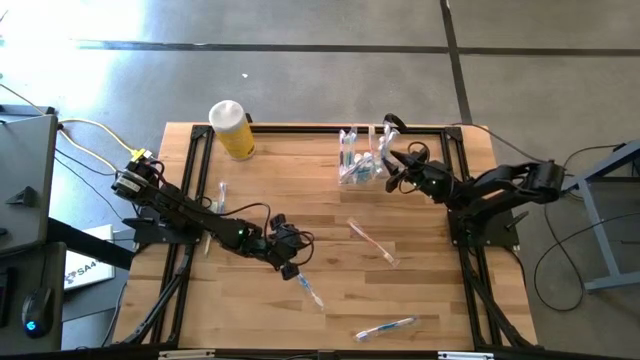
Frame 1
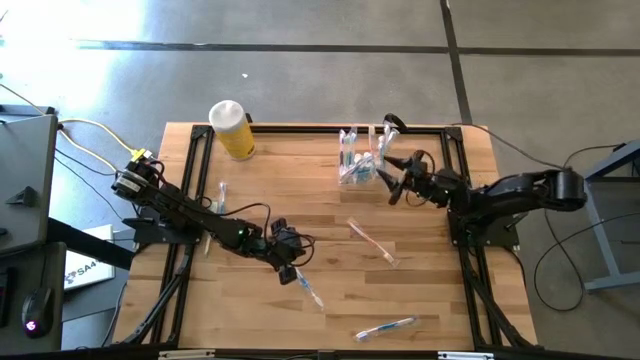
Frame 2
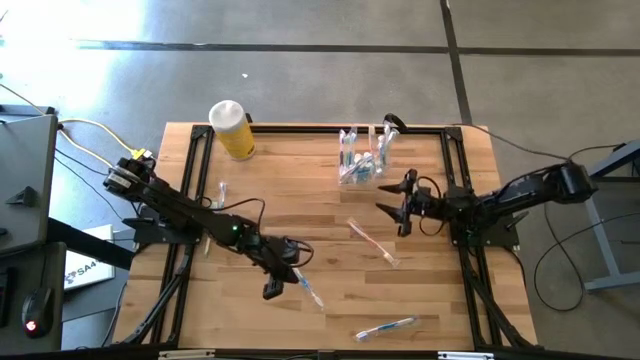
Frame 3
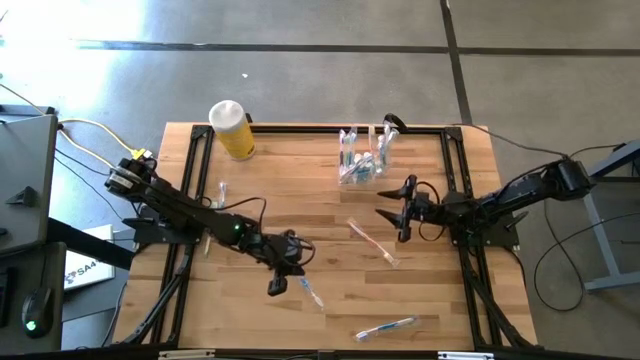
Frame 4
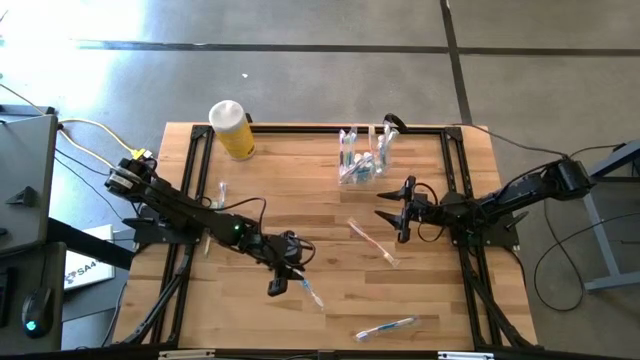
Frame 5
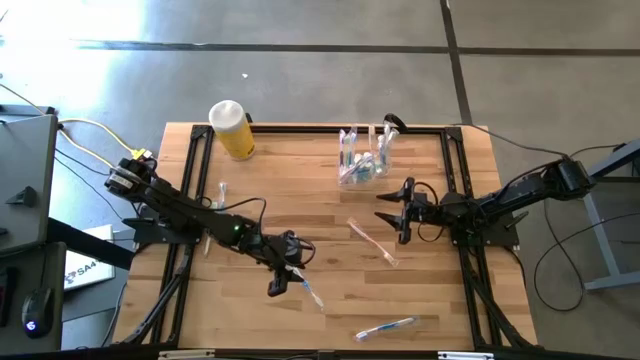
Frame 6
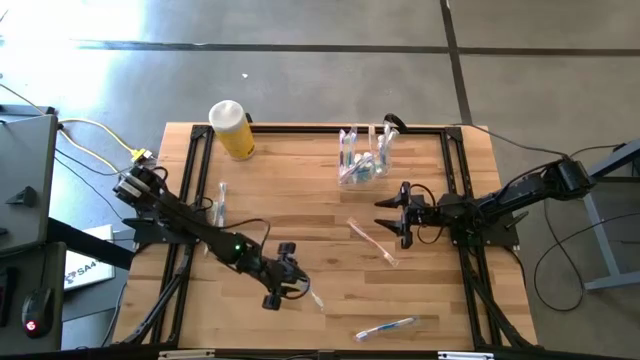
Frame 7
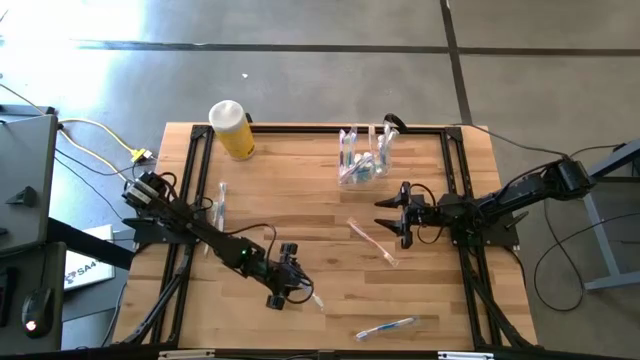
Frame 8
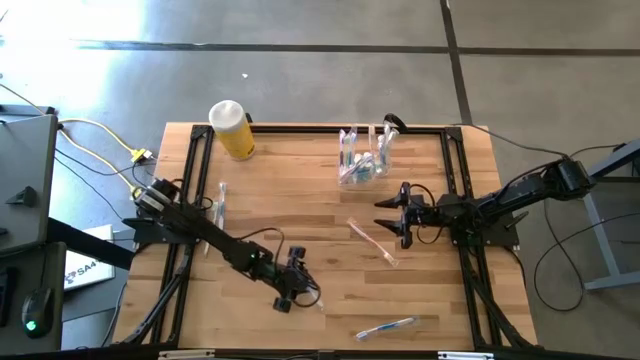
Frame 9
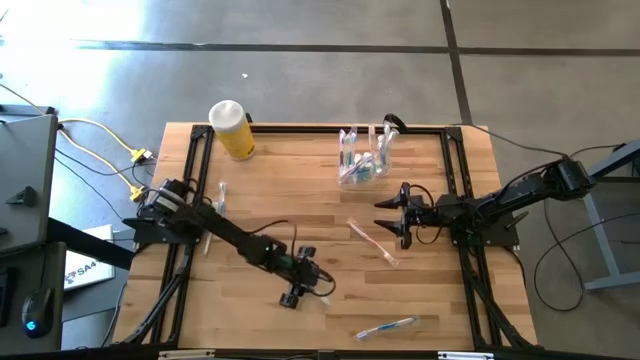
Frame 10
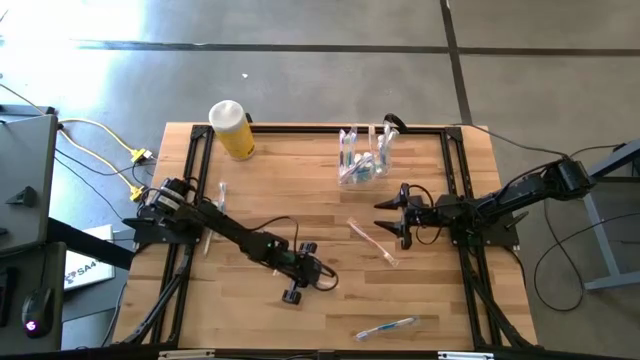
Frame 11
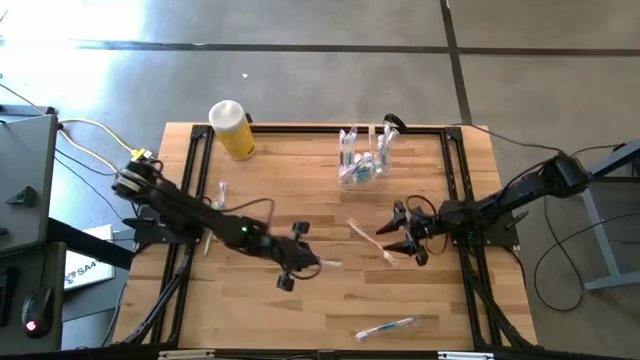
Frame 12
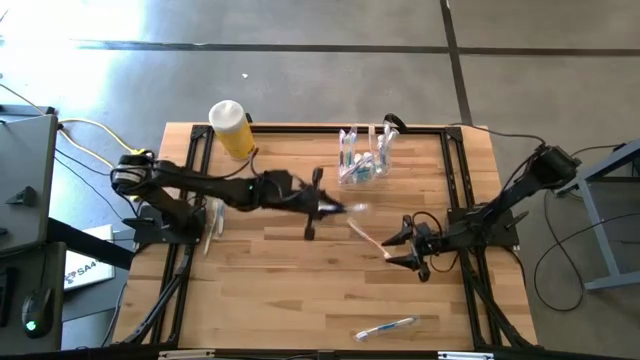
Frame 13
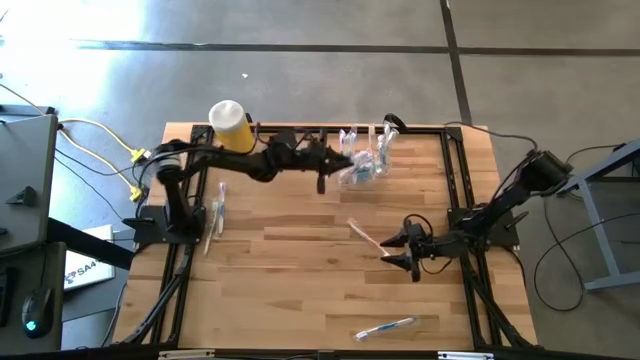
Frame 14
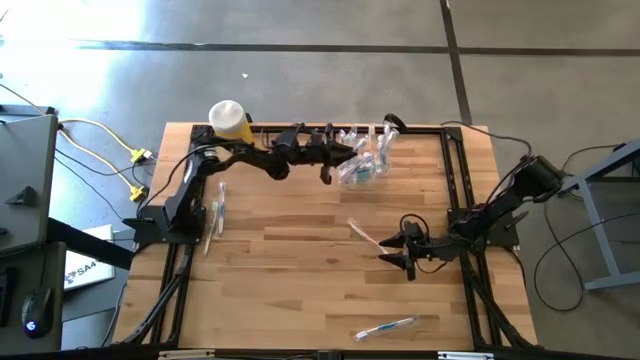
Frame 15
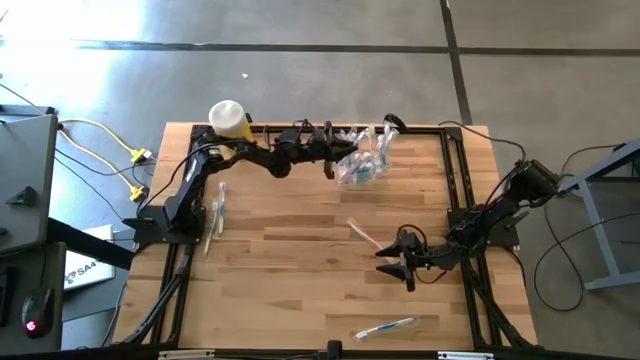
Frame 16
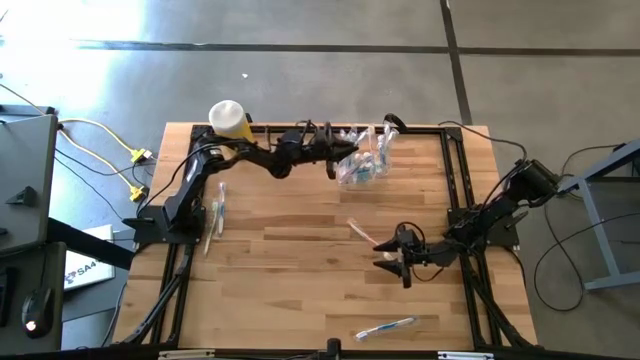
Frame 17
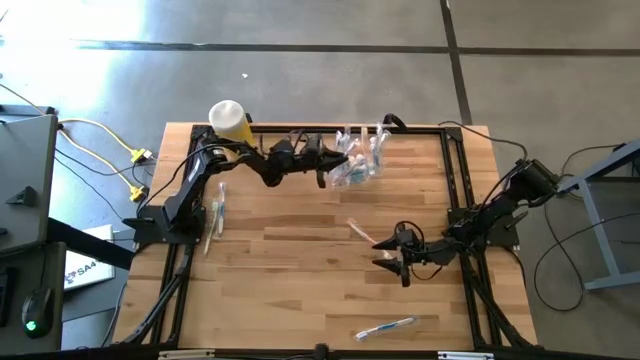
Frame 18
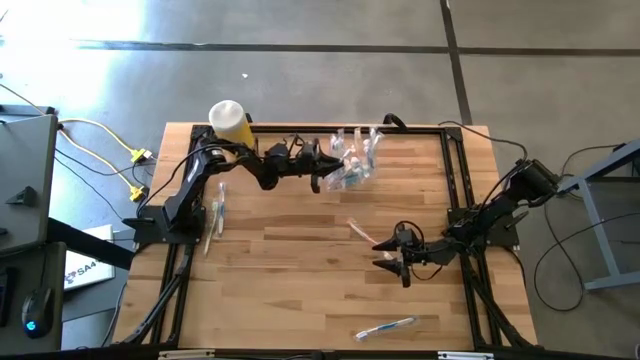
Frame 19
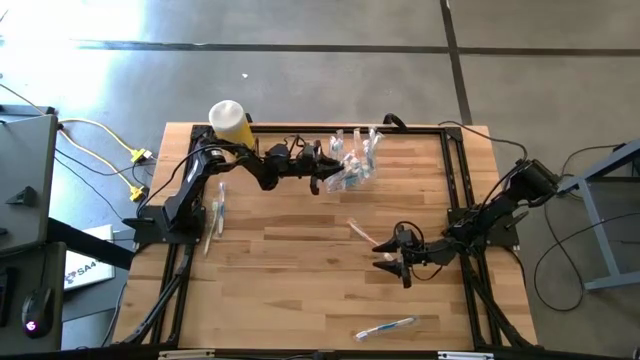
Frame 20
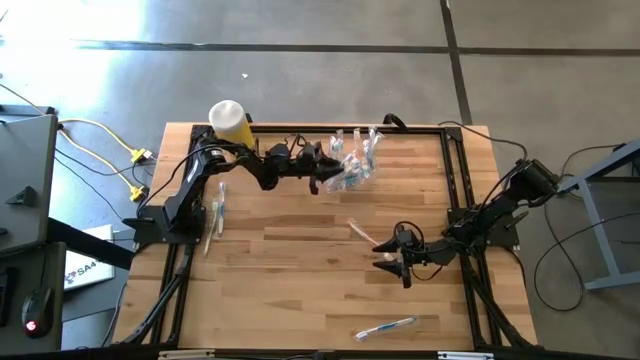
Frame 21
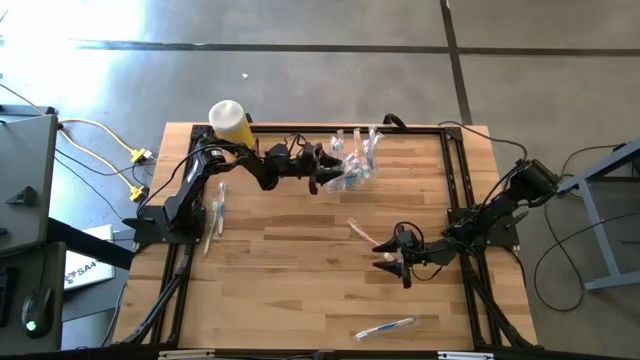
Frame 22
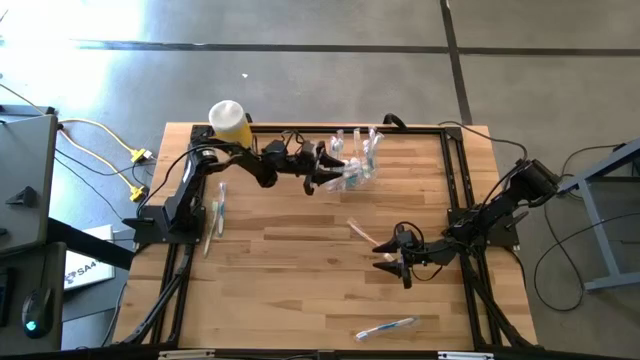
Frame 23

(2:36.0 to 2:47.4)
Task: Pick & Place toothbrushing station
Put the blue toothbrush into the transparent organizer

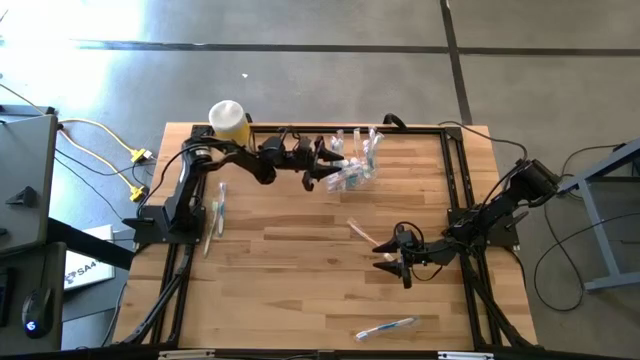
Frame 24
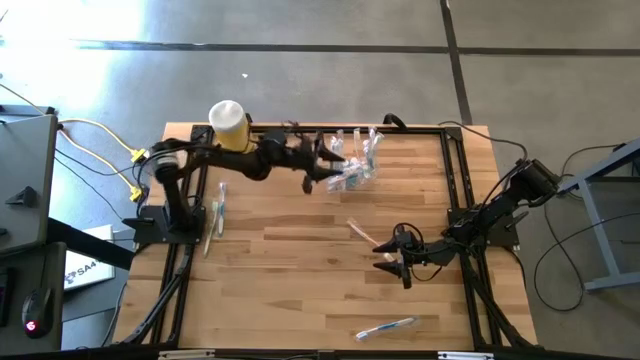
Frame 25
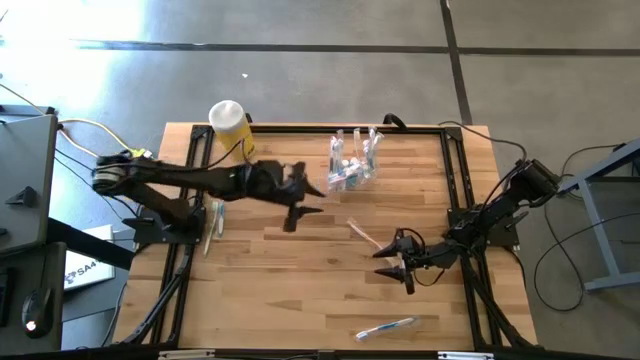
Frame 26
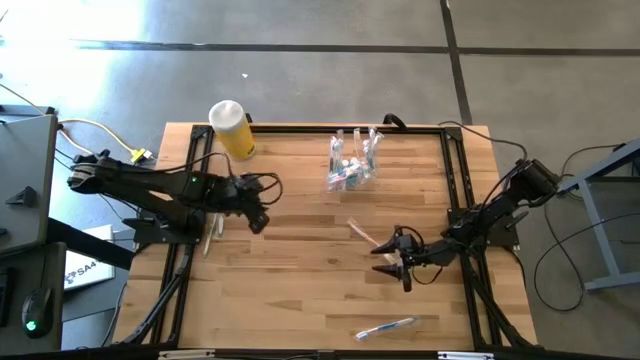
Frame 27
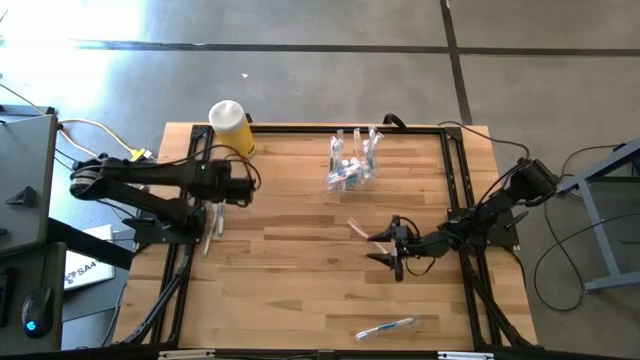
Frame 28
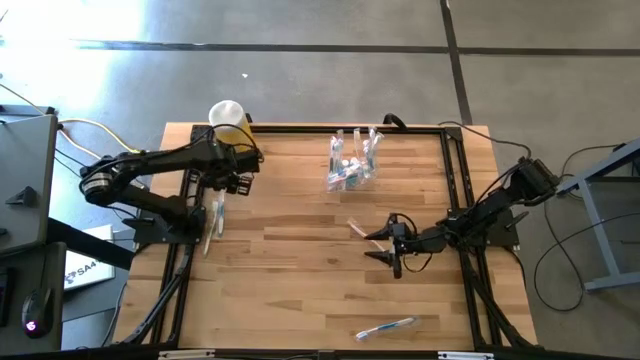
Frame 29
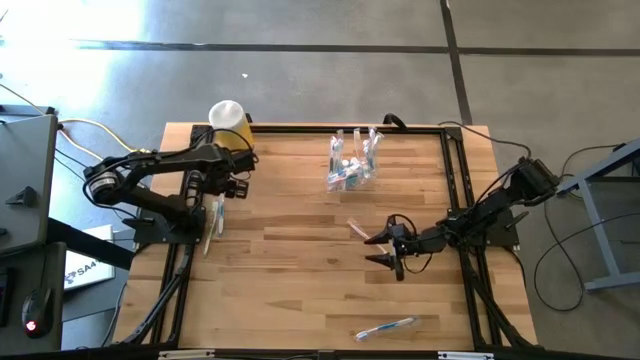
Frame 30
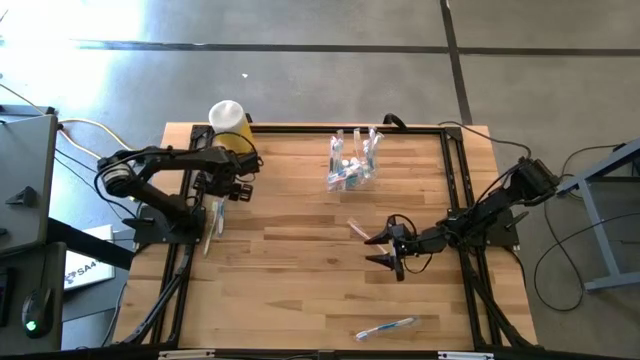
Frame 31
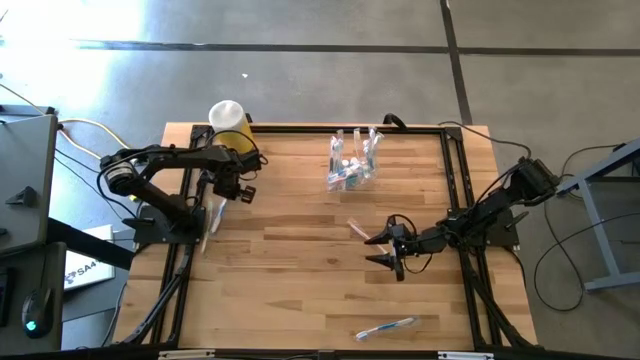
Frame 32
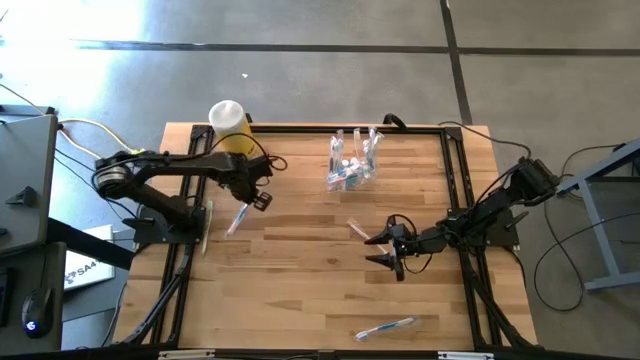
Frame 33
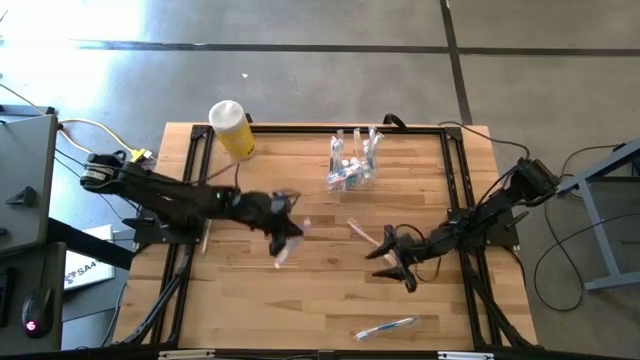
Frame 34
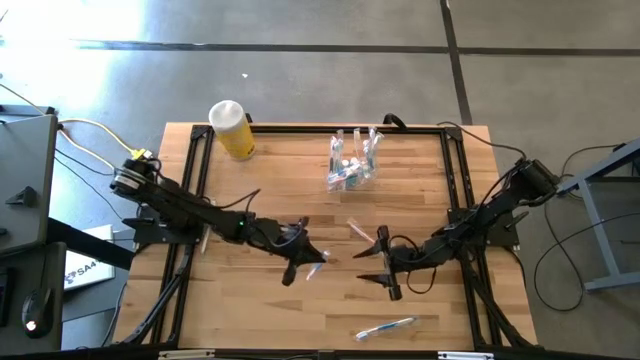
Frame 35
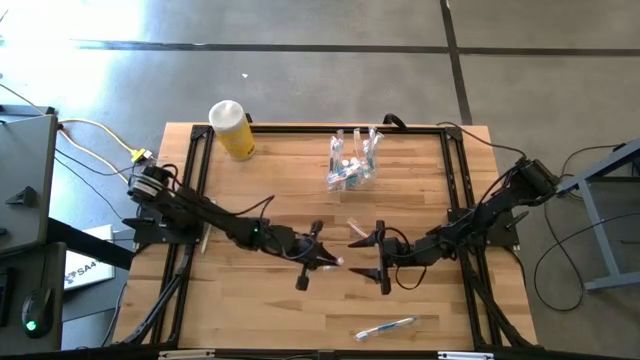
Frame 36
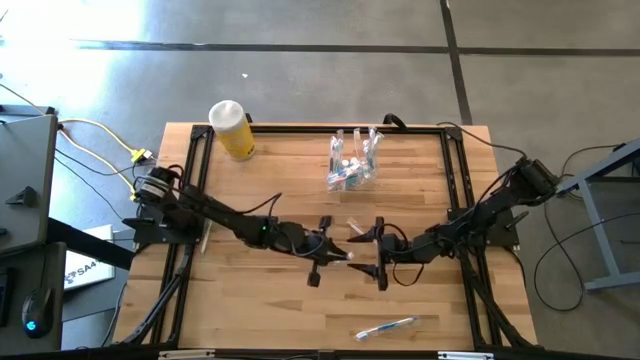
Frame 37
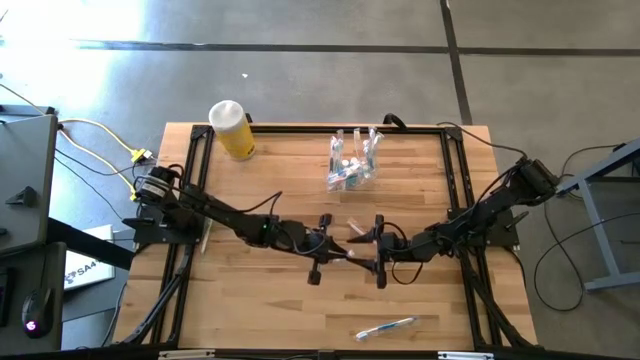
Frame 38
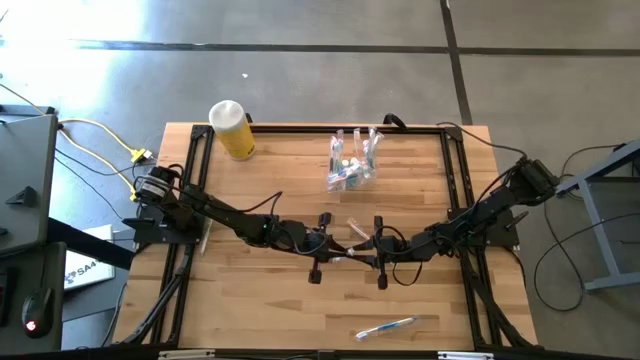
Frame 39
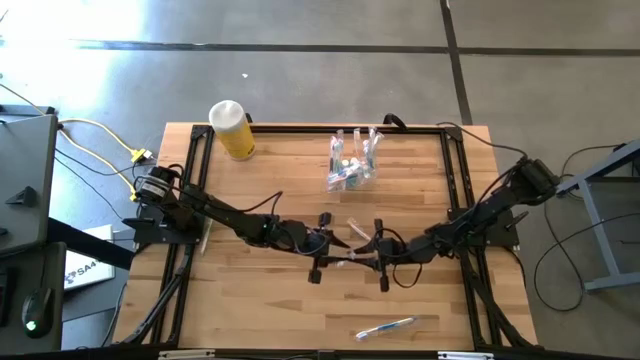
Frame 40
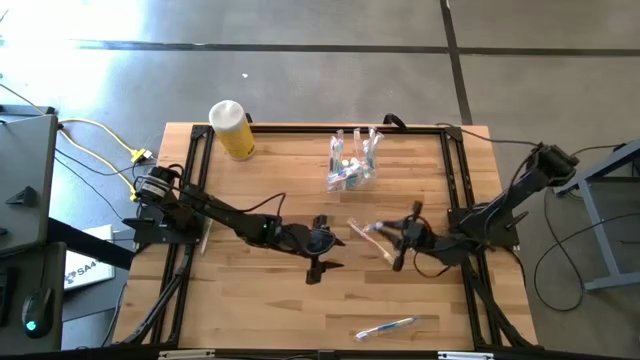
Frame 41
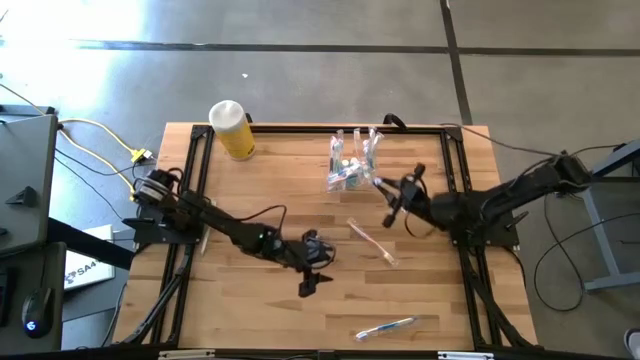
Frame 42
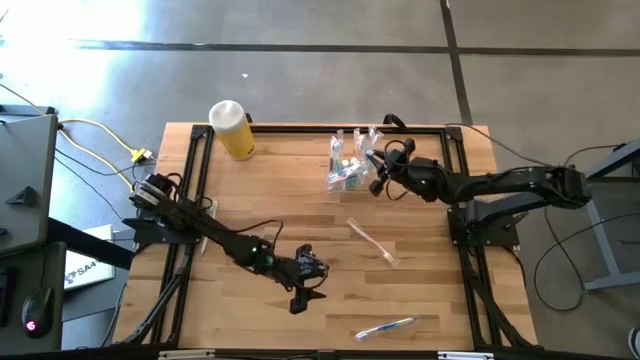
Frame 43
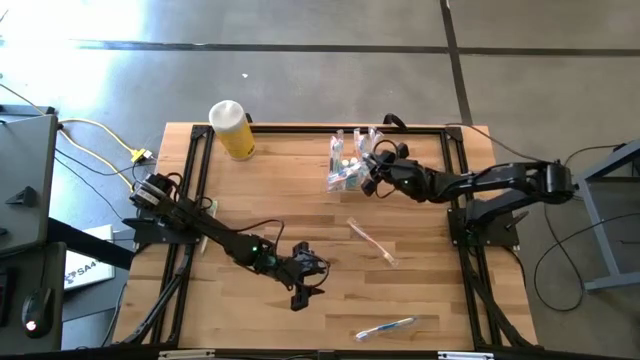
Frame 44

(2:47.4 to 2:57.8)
Put the blue toothbrush into the transparent organizer
